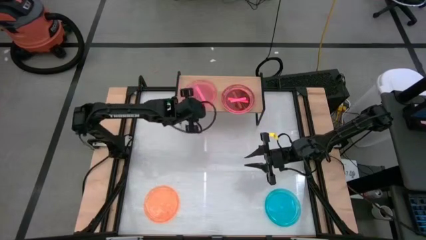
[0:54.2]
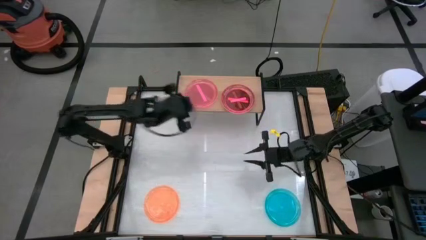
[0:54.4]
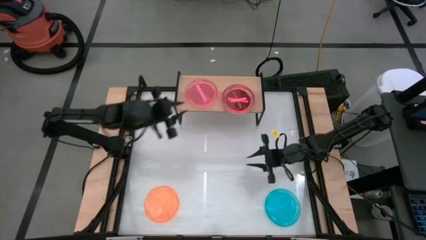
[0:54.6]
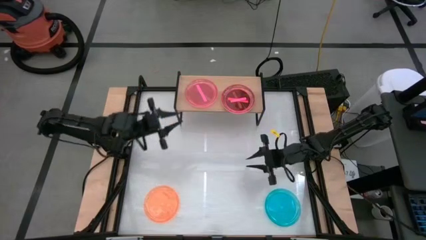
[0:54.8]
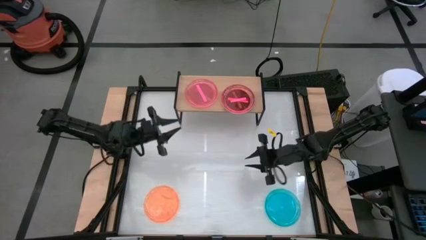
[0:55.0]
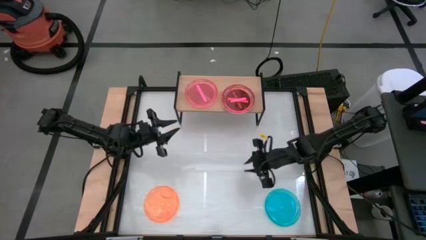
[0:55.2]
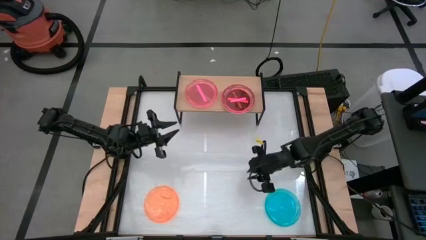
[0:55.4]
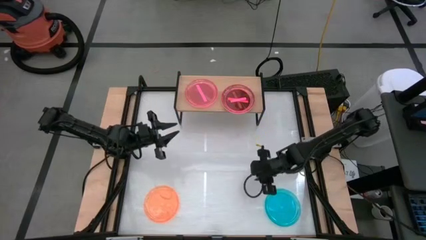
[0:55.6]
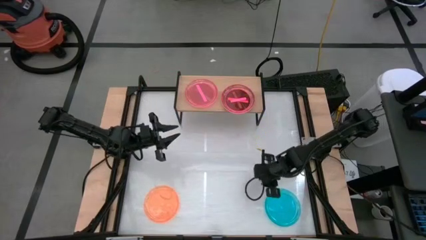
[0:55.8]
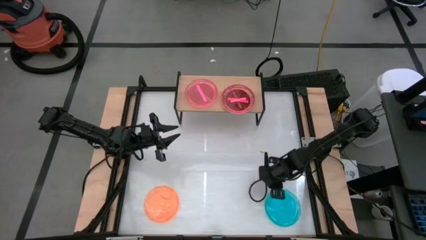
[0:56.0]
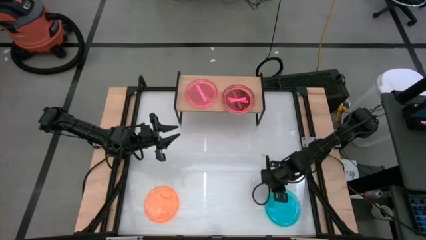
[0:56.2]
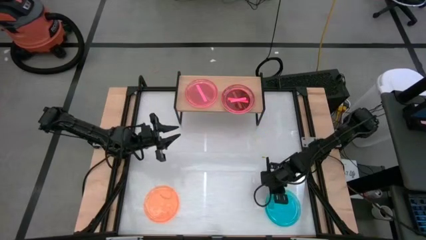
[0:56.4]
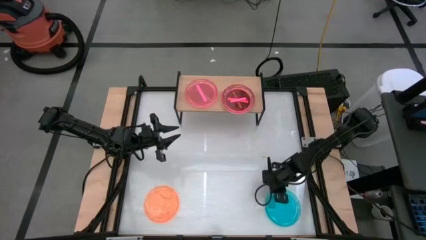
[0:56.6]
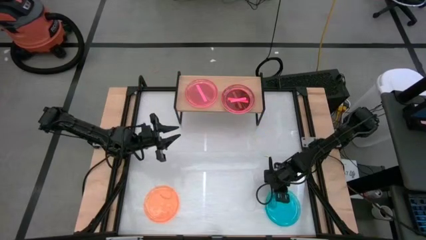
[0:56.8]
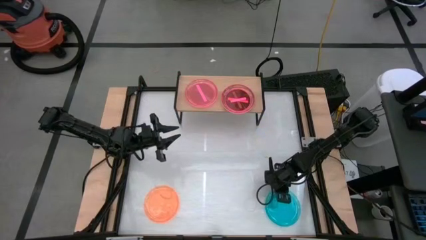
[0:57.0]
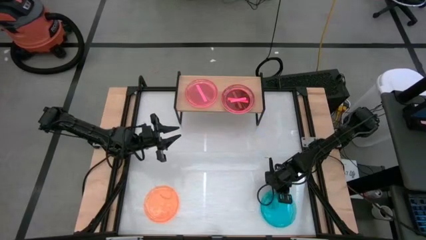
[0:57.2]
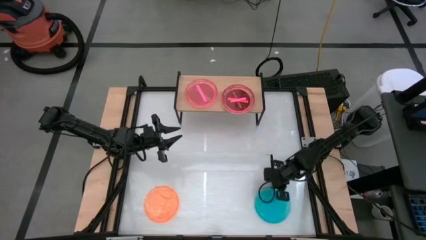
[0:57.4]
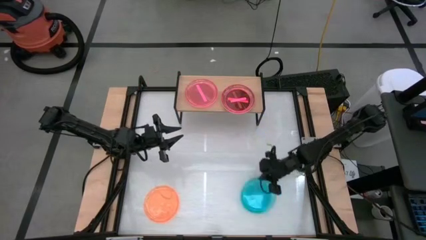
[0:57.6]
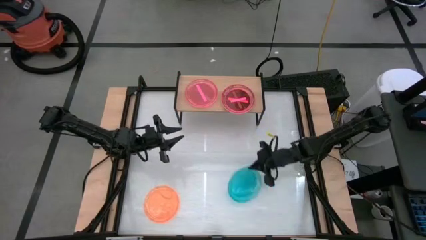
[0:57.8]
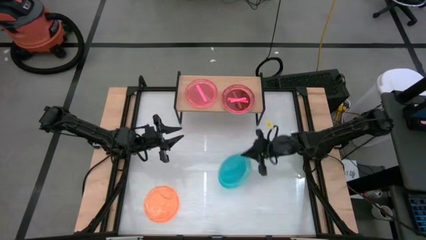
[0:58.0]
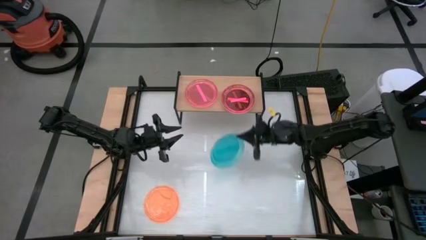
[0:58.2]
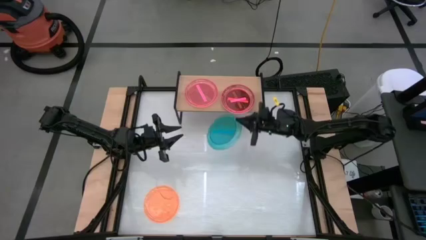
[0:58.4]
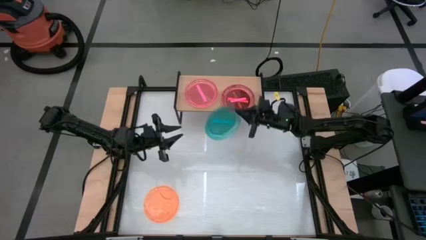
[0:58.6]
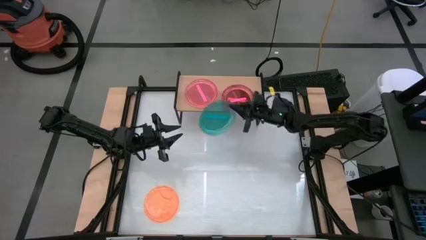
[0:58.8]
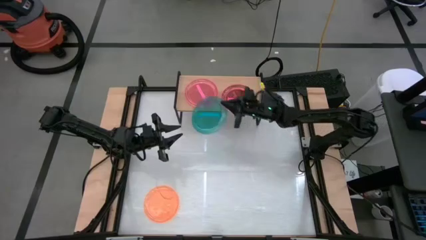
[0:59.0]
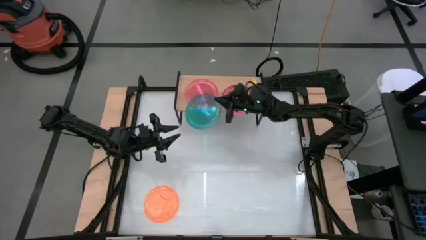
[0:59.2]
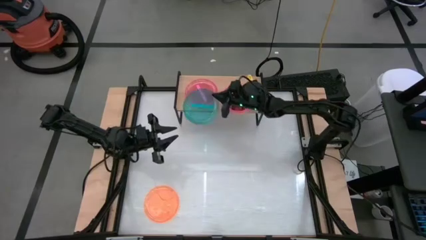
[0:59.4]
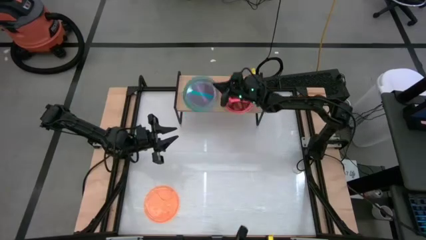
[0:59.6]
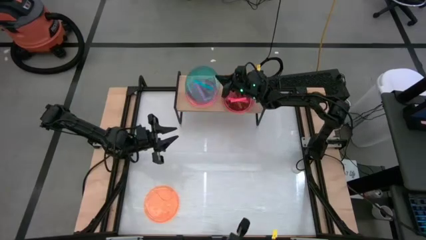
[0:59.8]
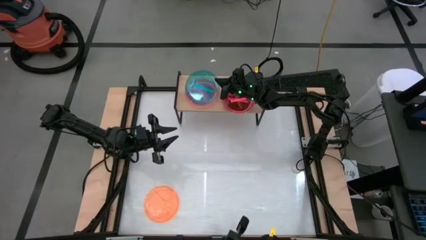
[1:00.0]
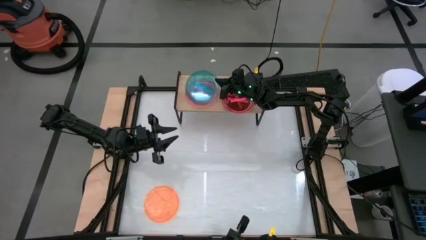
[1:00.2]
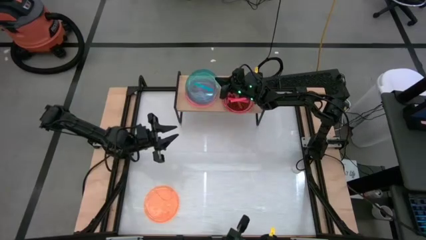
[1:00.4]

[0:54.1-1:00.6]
Task: Place and stack plates onto a shelf
Stack the blue plate on top of the pink plate on the shelf

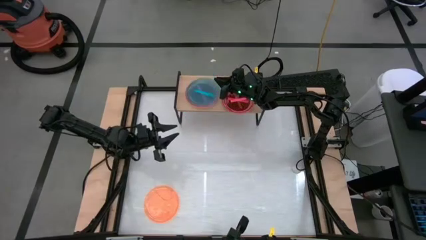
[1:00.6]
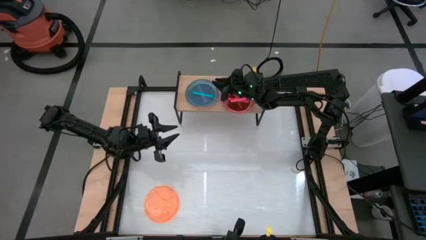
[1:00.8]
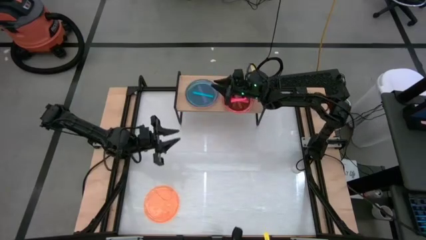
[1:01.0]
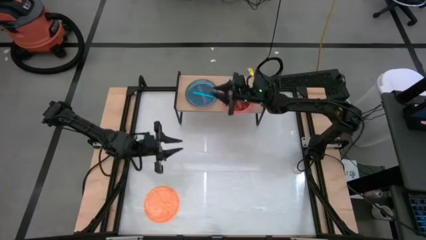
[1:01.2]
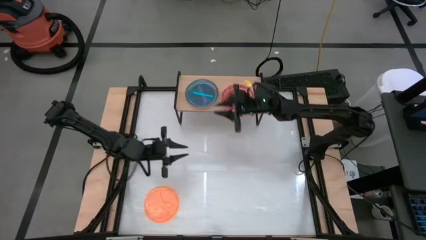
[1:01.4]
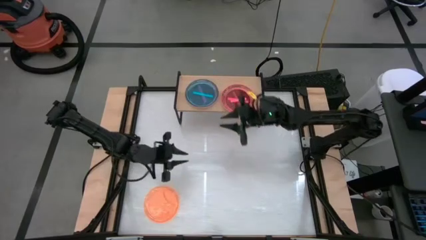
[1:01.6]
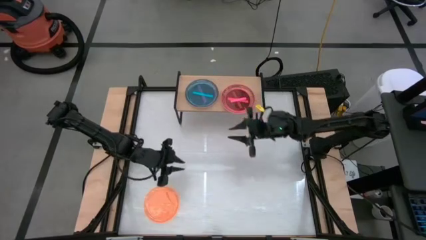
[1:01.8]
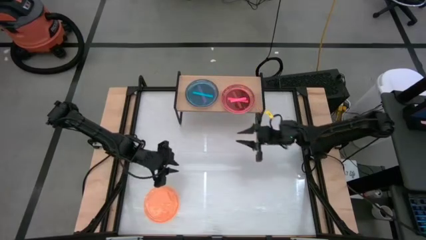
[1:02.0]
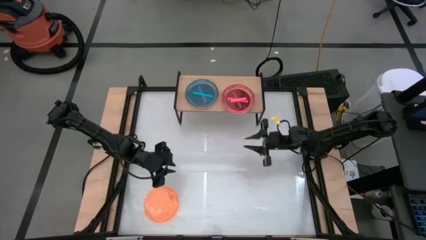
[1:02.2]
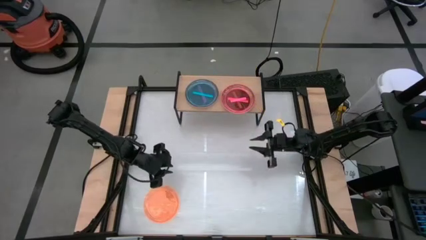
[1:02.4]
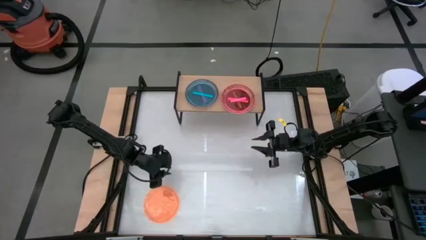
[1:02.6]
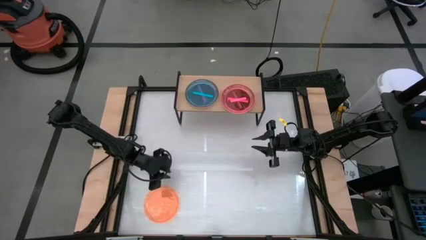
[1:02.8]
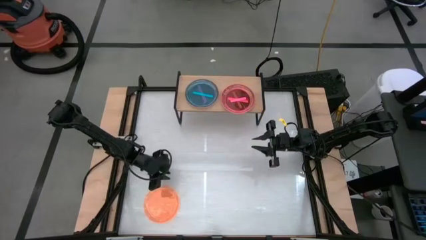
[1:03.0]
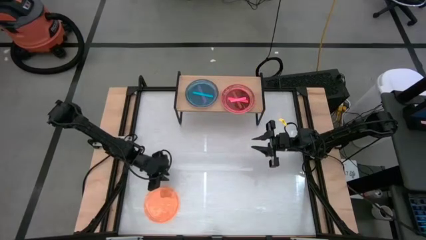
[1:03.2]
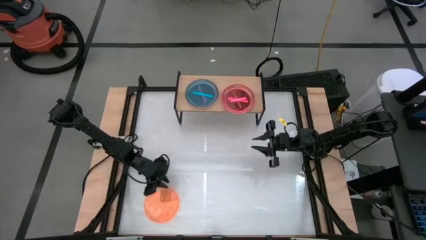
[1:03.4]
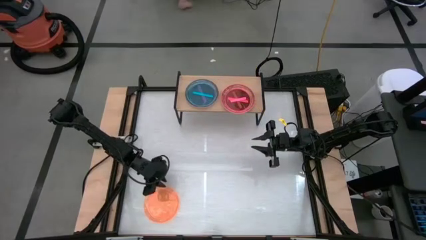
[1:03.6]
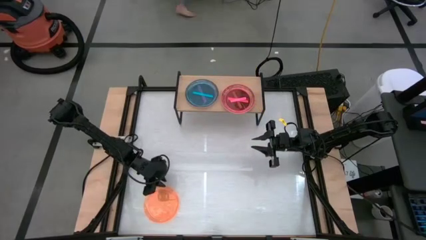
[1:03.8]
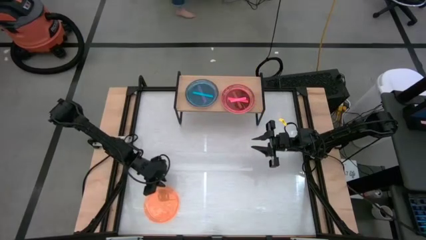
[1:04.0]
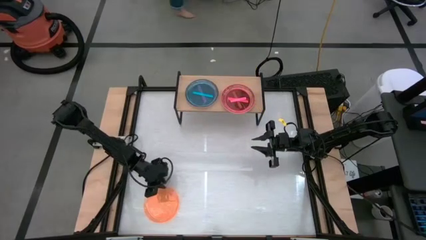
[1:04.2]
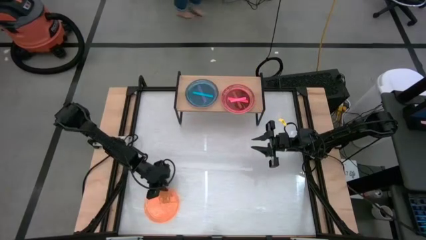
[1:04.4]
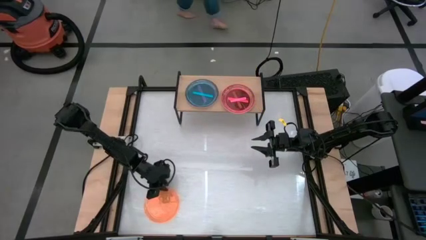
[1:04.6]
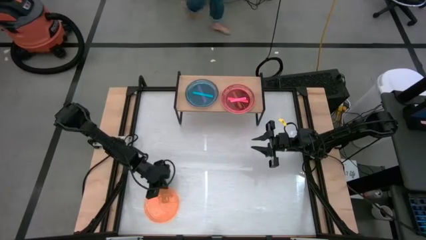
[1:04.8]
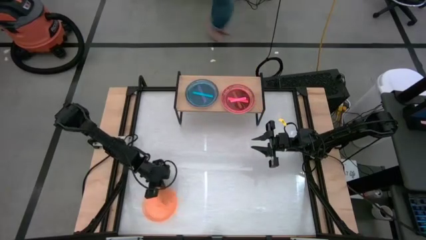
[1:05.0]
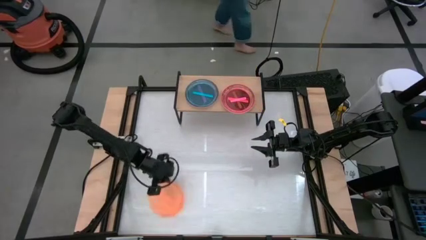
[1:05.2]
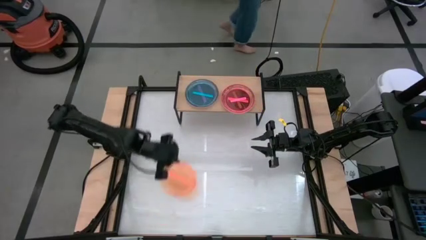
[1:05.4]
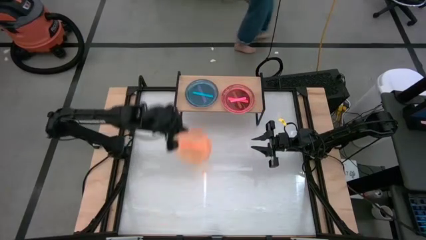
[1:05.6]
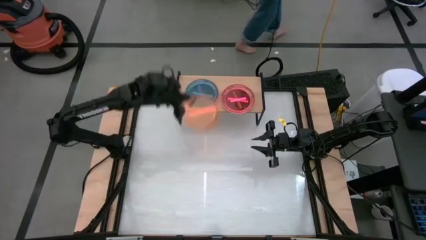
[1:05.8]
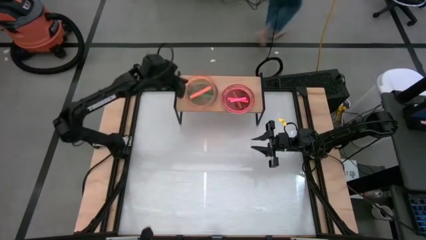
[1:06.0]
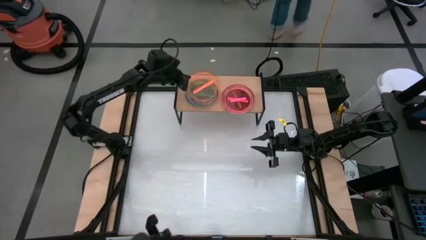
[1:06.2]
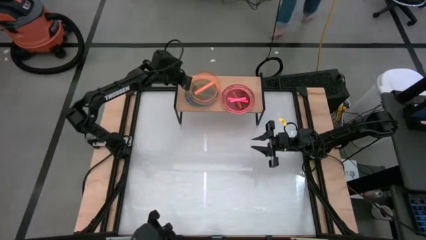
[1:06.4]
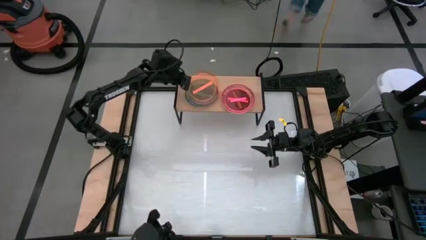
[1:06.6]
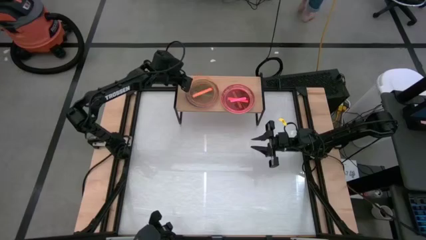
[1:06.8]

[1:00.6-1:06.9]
Stack the orange plate on top of the blue plate on the shelf
